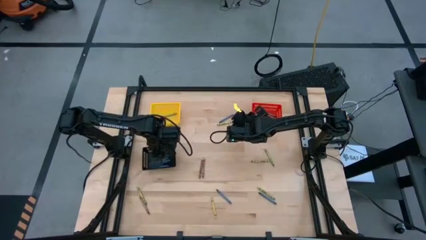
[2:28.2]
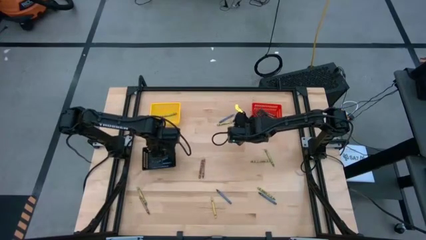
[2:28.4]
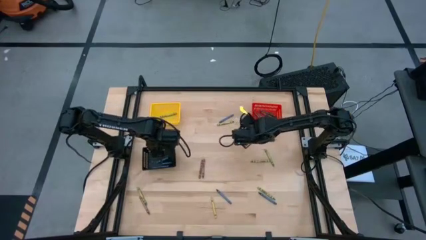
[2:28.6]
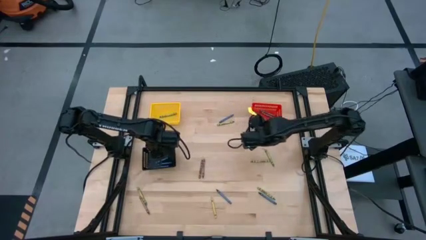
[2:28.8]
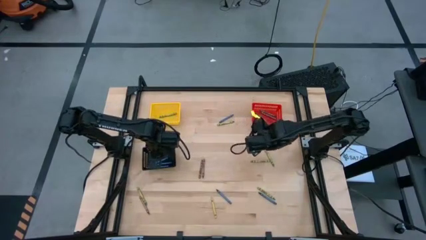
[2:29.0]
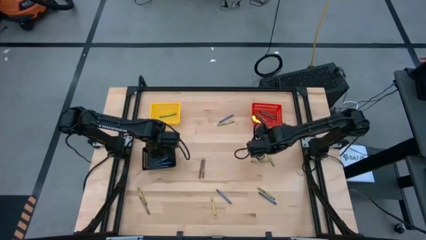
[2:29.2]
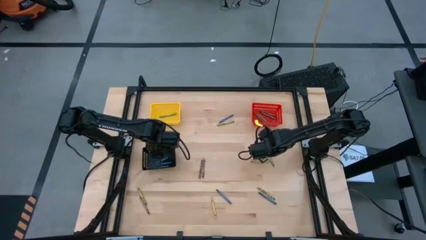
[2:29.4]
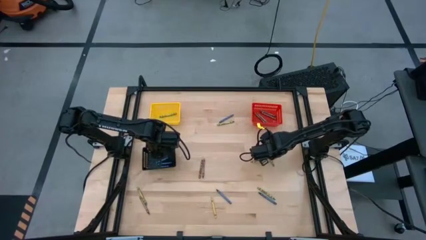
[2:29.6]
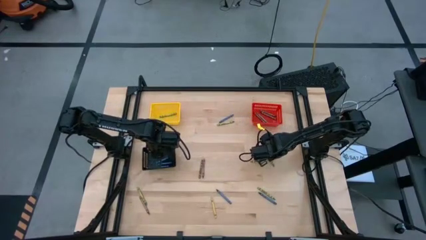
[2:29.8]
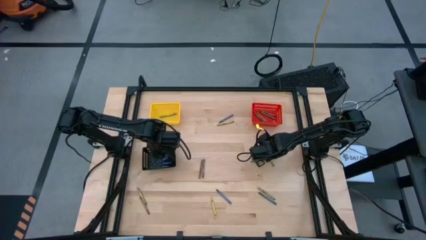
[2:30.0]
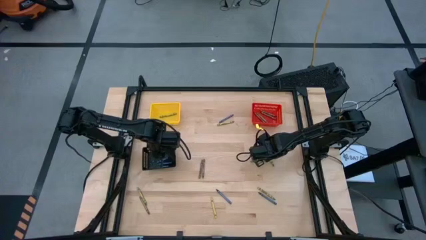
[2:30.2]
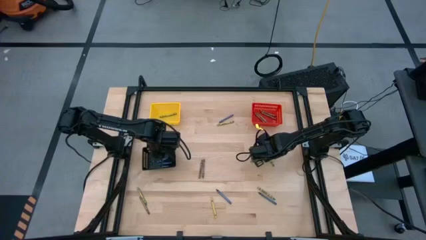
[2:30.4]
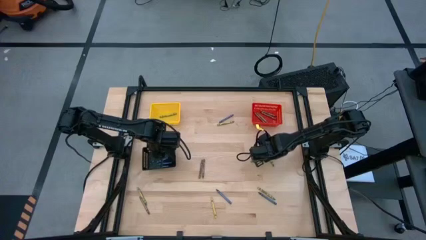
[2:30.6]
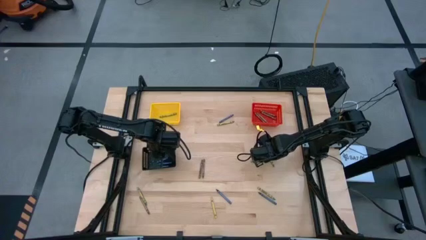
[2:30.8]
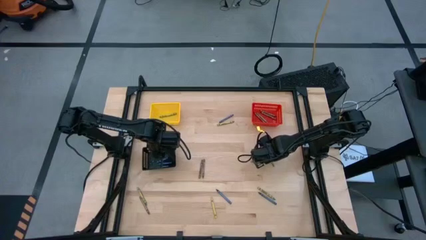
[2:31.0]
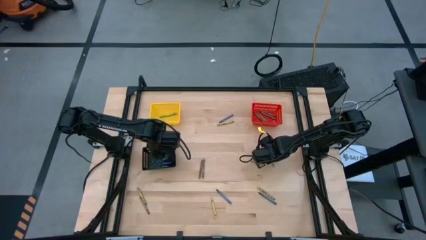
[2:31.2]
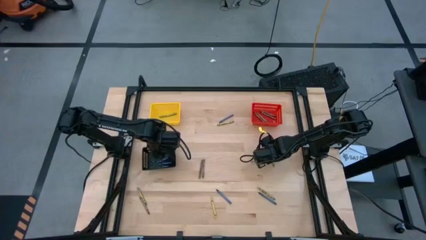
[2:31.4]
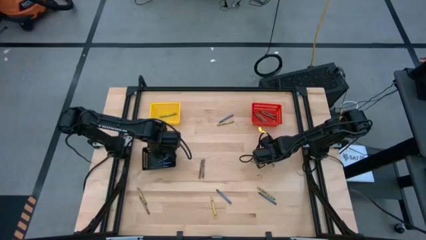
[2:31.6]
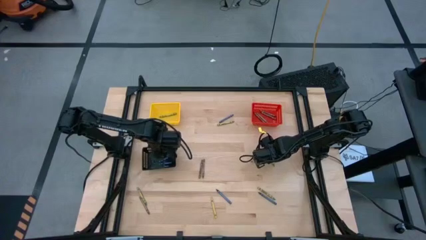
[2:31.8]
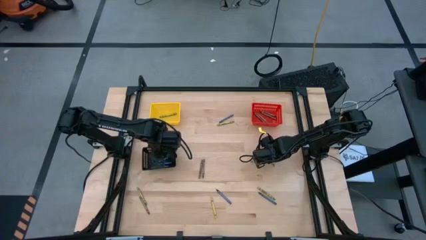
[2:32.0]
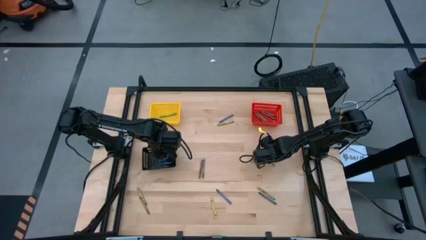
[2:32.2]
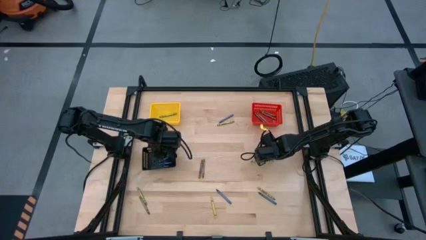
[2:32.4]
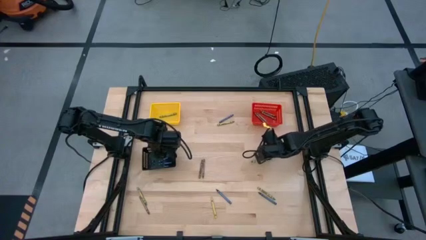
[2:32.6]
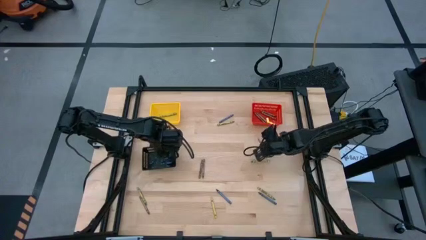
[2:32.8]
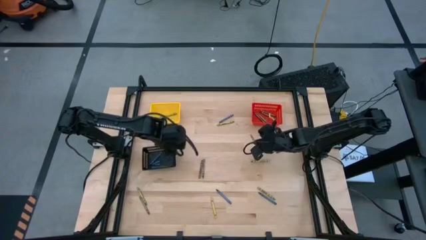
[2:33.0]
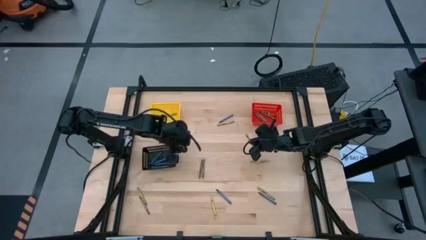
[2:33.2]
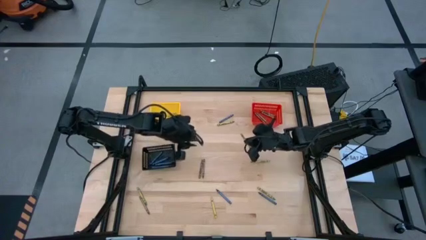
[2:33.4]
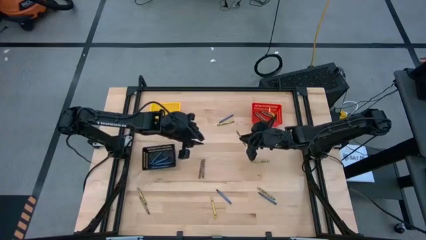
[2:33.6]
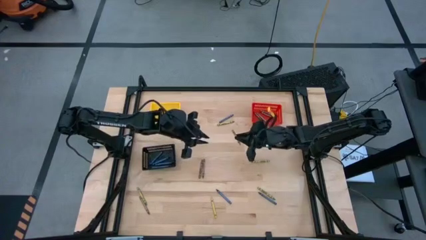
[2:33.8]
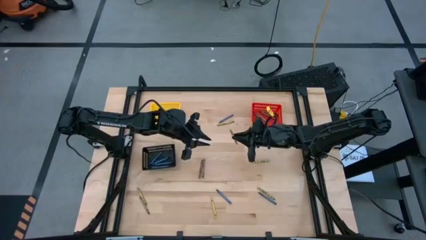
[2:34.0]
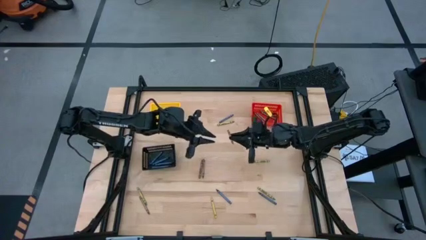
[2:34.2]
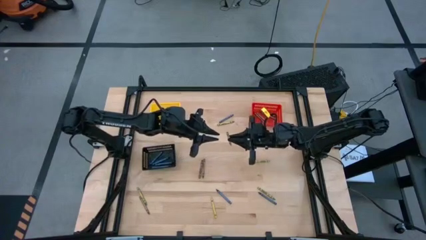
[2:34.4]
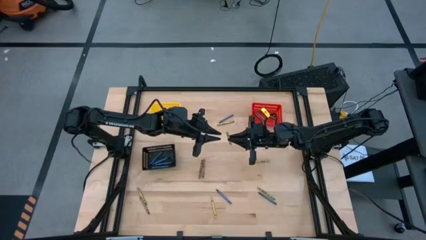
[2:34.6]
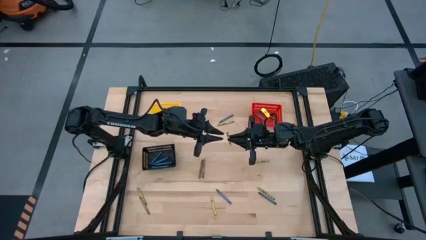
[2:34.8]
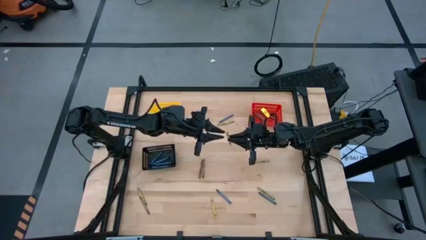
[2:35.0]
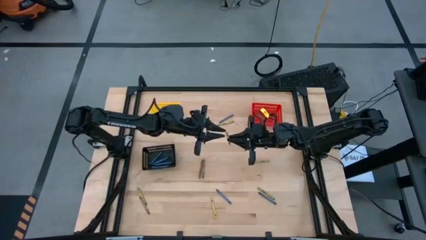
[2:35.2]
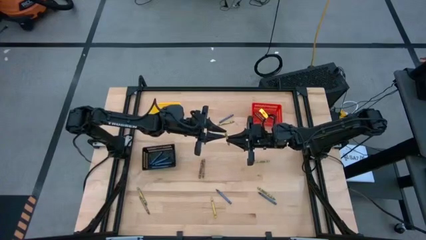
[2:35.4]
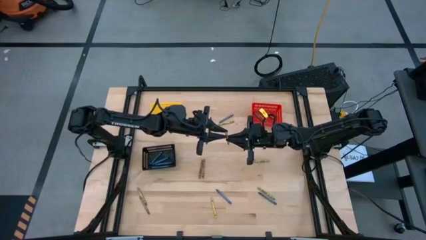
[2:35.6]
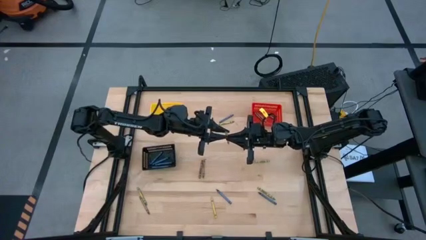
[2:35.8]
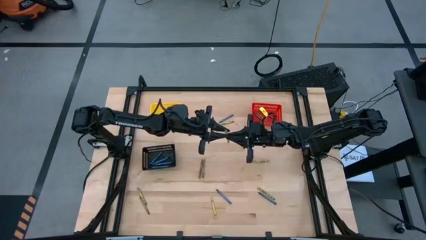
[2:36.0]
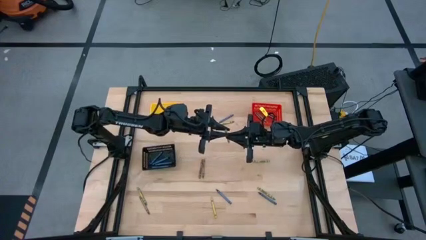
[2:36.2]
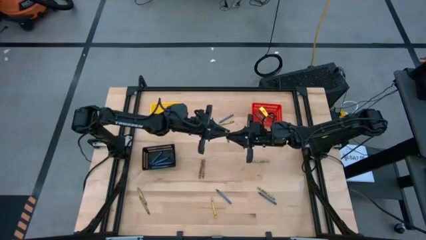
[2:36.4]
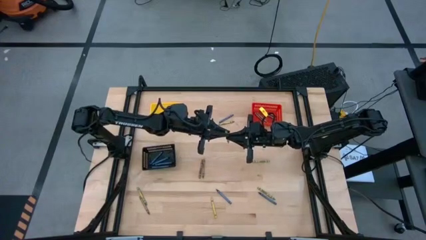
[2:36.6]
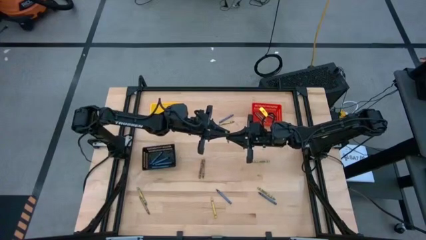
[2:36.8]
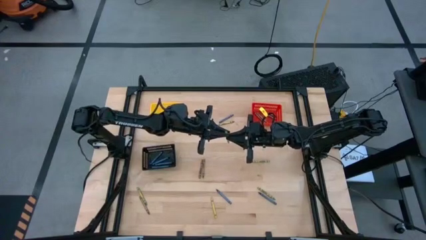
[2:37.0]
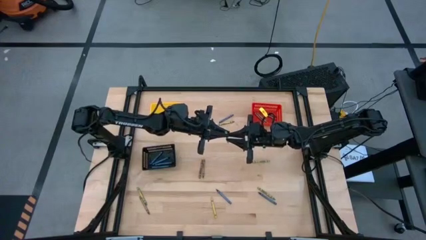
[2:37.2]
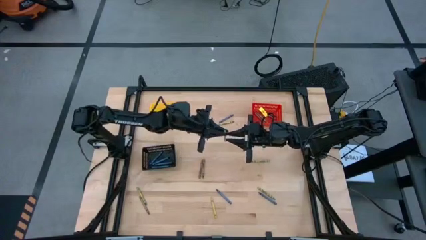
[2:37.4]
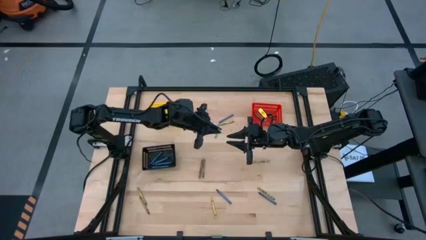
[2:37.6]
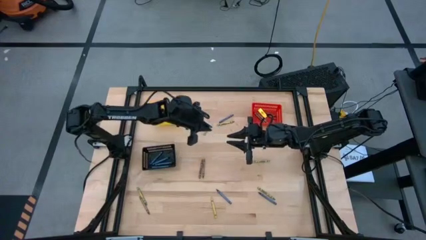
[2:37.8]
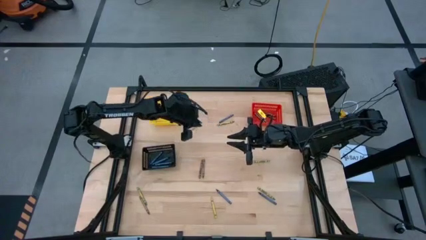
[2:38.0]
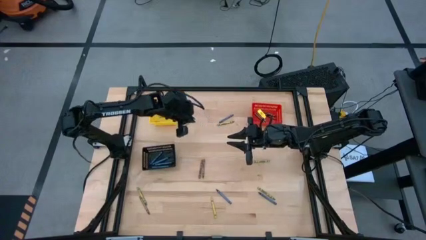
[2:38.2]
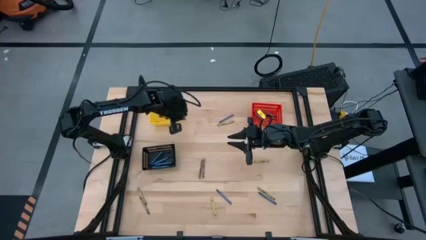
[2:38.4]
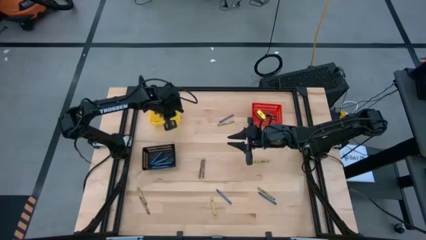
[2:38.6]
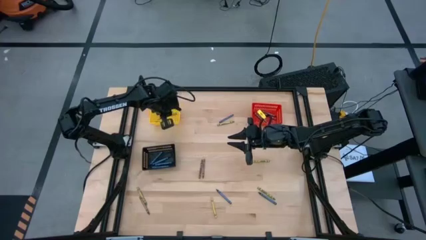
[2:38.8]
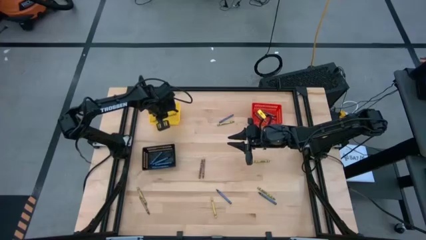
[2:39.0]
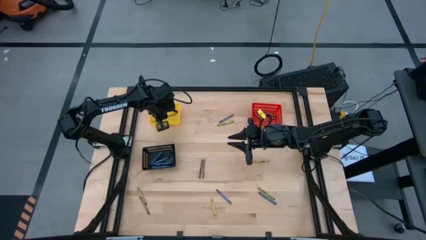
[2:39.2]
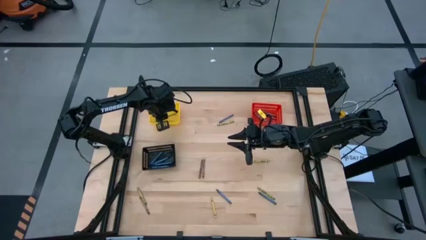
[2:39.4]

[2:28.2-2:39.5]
Task: Sort crayons
Put the green crayon into the yellow bin

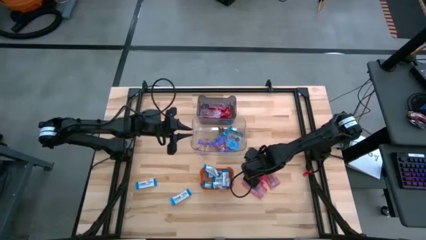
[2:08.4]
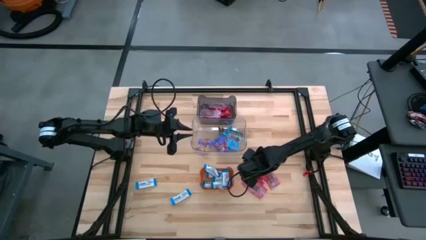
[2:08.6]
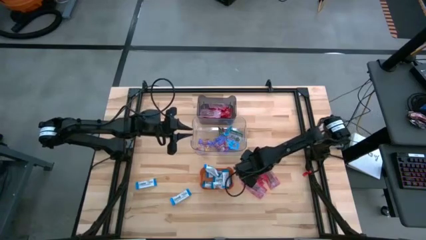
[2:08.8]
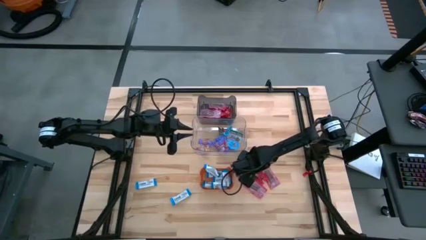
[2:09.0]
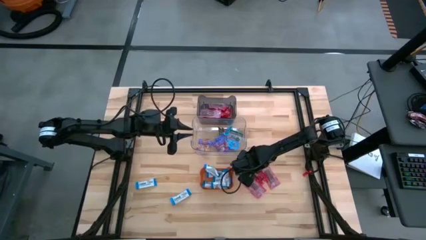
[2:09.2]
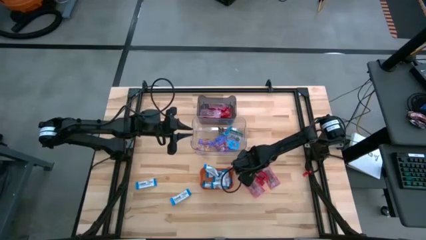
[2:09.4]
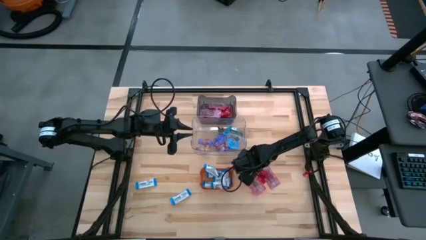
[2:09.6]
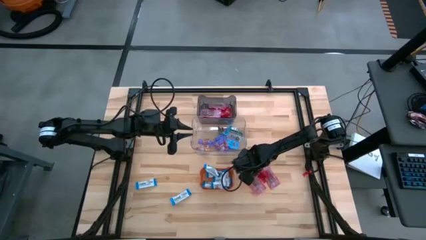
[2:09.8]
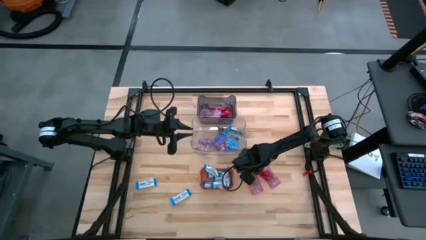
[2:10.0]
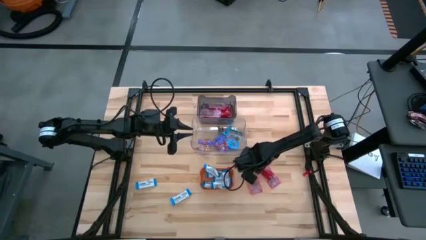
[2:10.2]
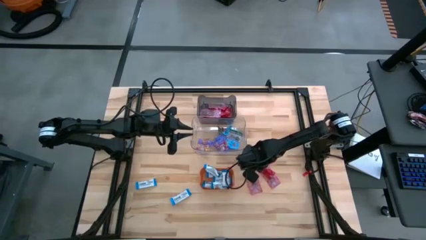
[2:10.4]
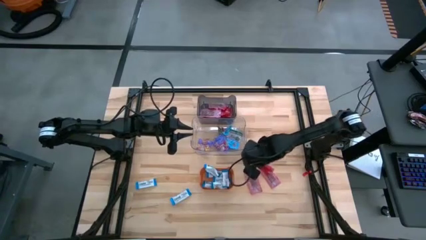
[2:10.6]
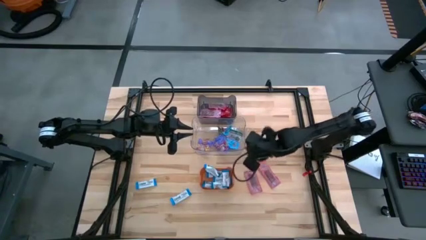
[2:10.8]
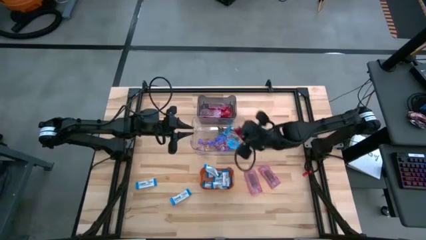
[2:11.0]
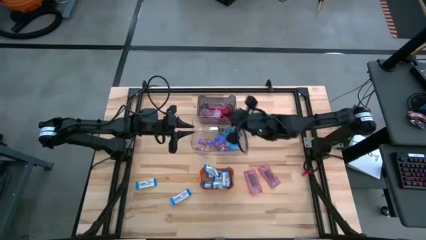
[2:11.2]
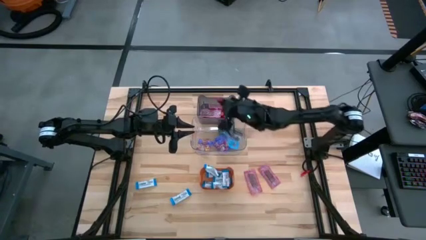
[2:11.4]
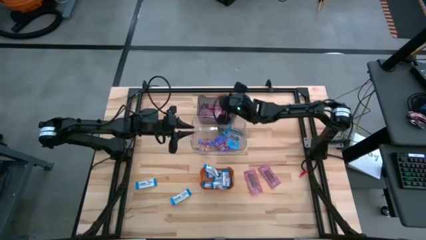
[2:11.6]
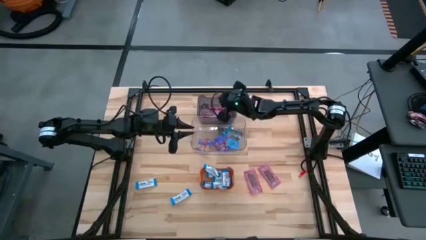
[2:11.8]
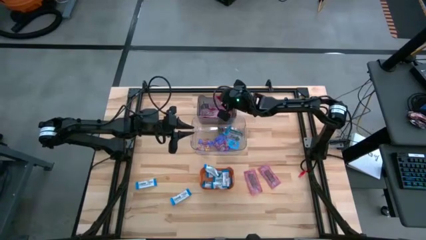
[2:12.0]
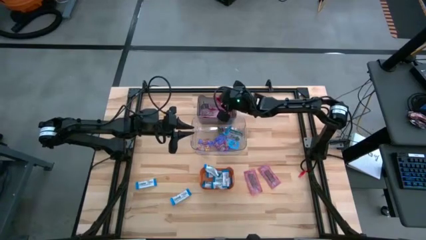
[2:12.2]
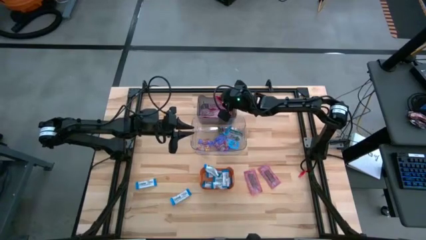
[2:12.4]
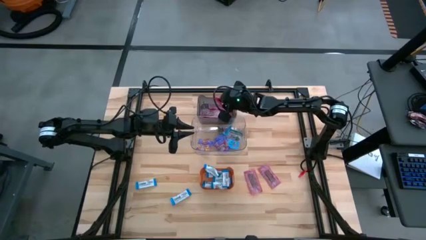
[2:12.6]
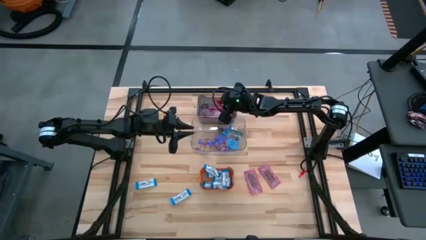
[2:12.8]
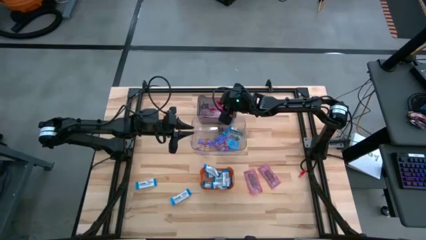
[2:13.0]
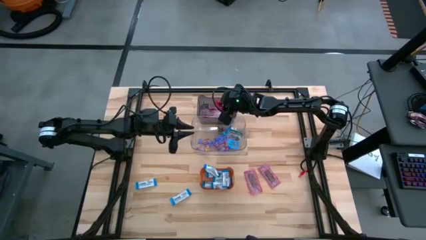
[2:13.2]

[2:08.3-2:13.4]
Task: Sort candy
Put the red candy into the black transparent bin
